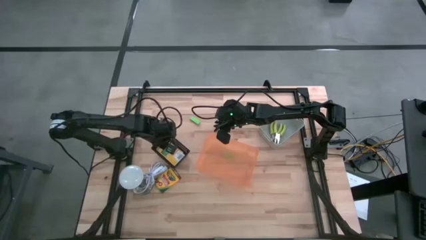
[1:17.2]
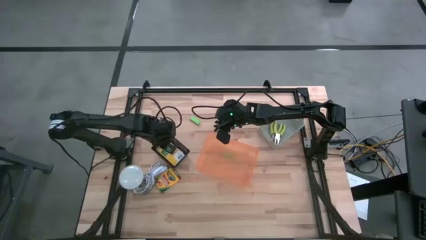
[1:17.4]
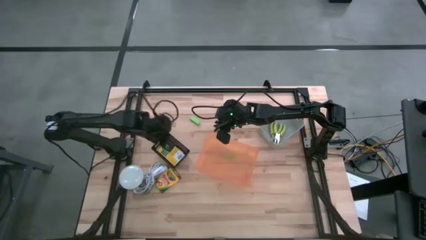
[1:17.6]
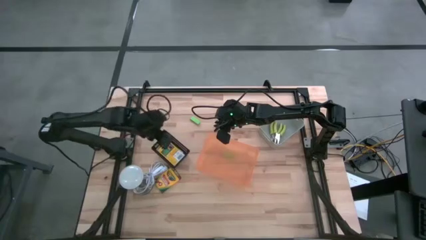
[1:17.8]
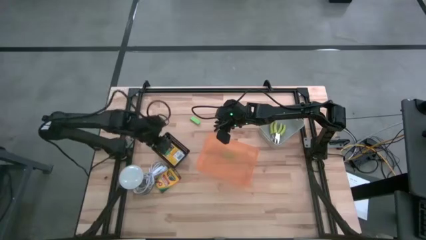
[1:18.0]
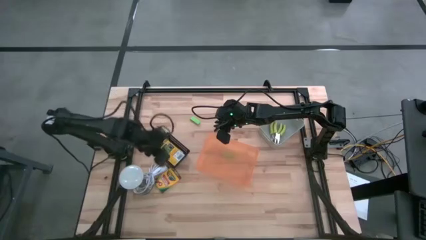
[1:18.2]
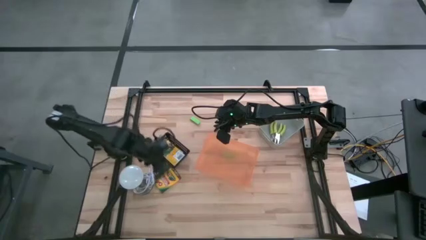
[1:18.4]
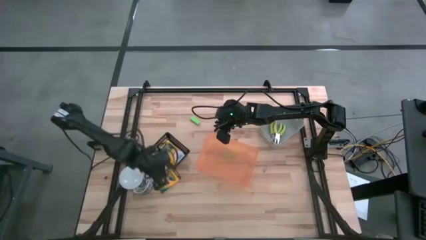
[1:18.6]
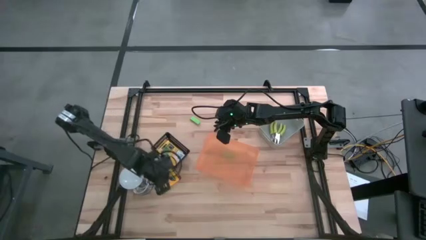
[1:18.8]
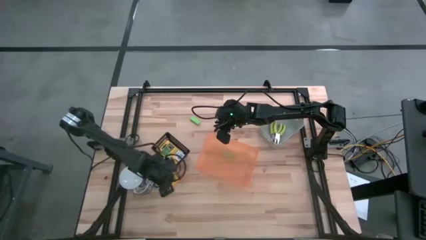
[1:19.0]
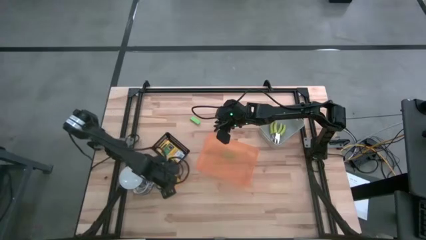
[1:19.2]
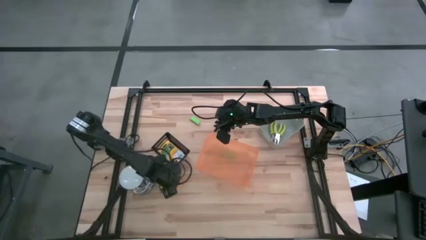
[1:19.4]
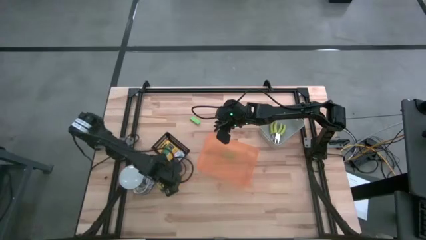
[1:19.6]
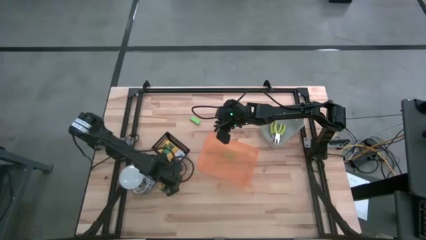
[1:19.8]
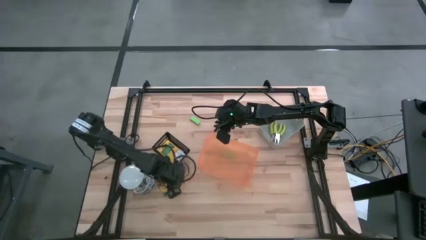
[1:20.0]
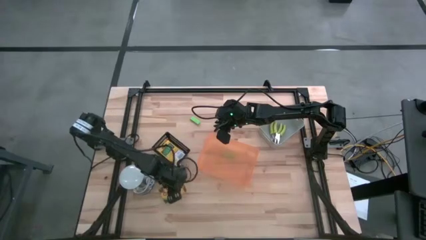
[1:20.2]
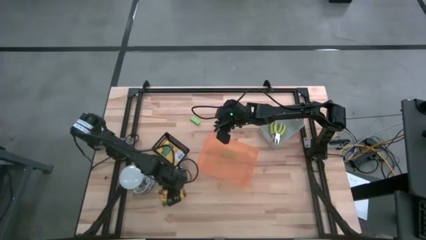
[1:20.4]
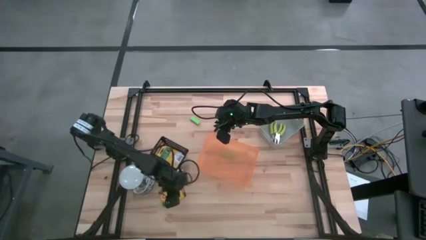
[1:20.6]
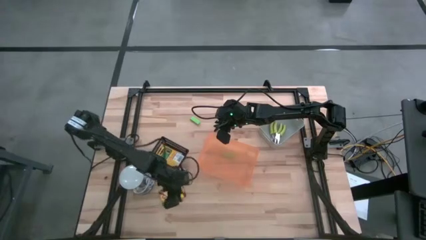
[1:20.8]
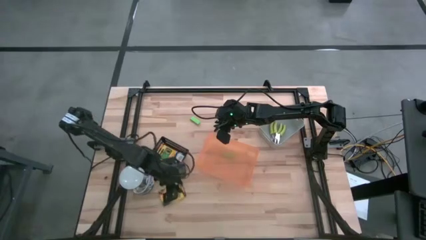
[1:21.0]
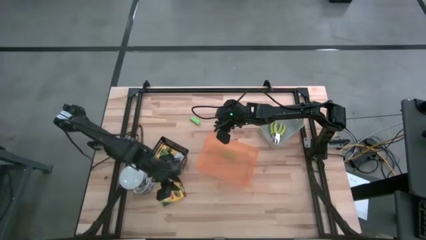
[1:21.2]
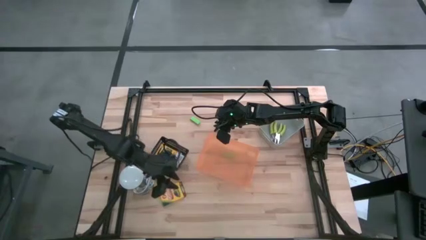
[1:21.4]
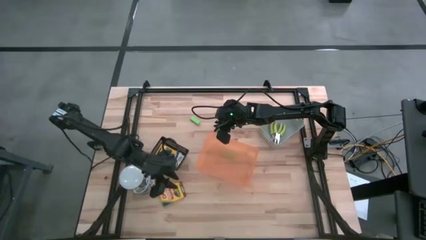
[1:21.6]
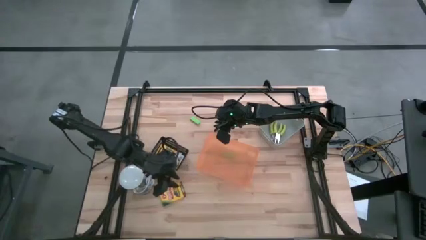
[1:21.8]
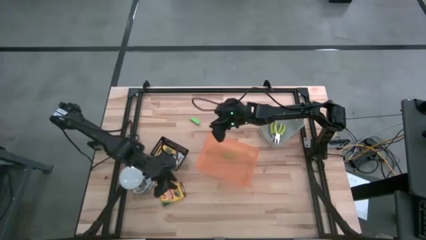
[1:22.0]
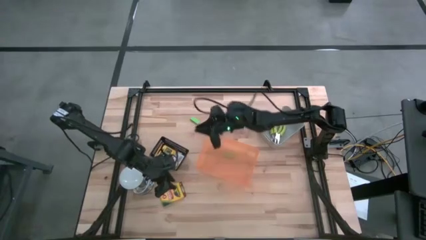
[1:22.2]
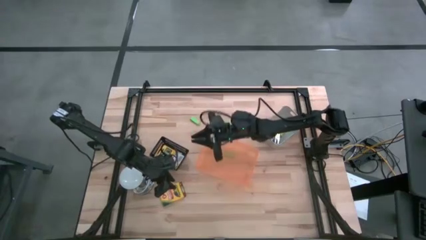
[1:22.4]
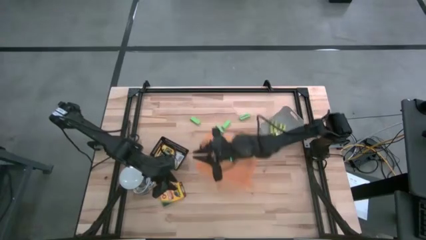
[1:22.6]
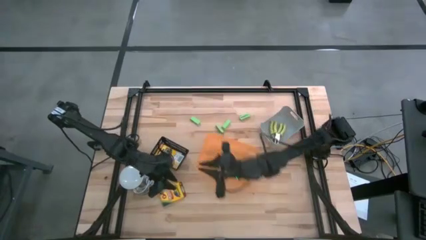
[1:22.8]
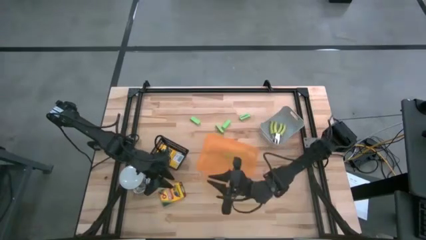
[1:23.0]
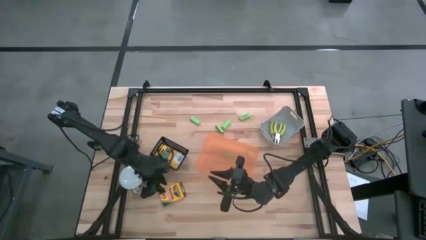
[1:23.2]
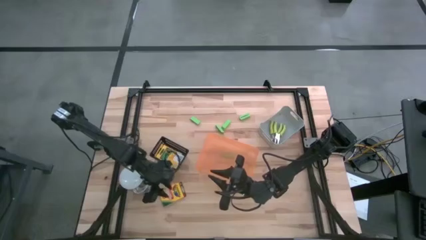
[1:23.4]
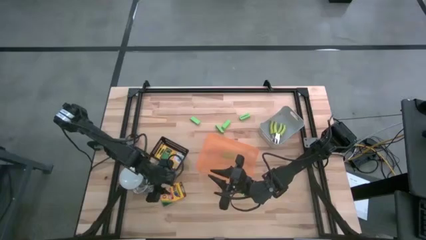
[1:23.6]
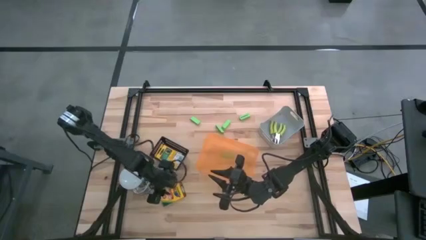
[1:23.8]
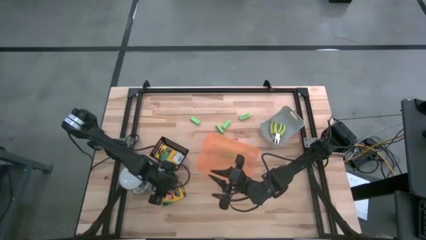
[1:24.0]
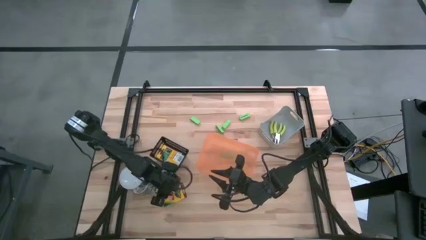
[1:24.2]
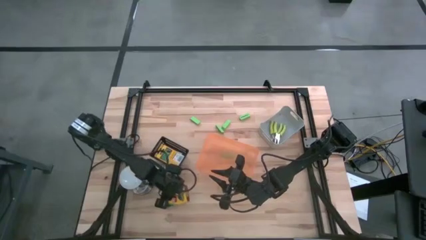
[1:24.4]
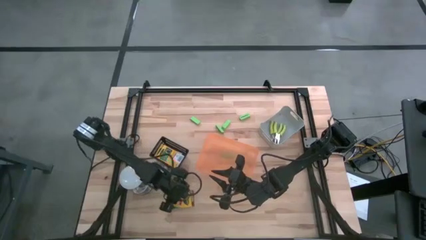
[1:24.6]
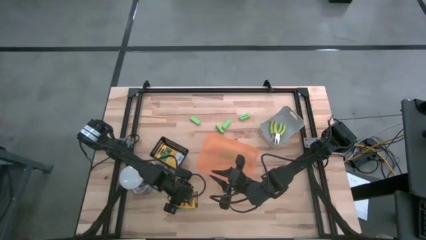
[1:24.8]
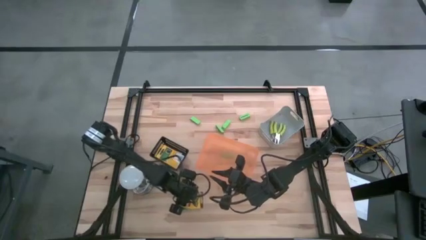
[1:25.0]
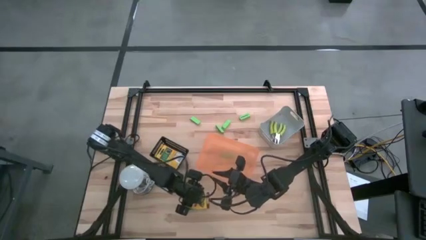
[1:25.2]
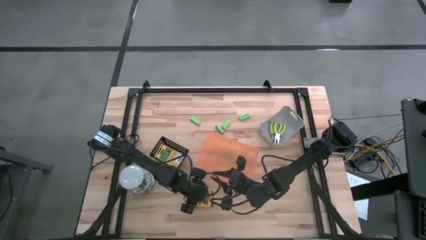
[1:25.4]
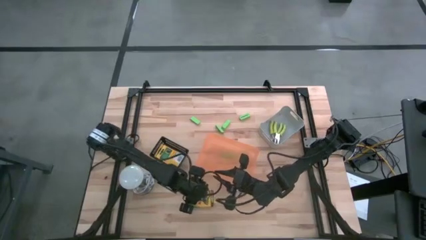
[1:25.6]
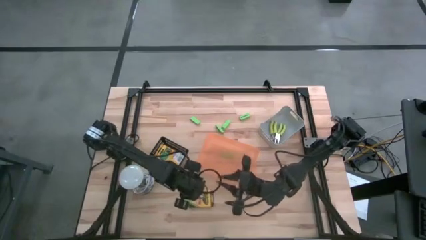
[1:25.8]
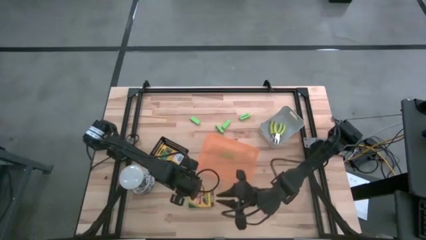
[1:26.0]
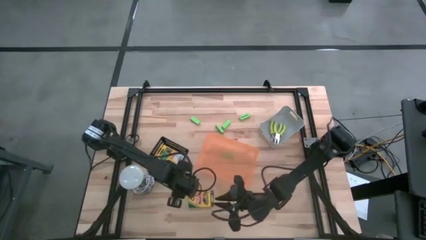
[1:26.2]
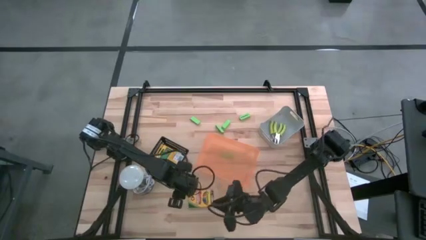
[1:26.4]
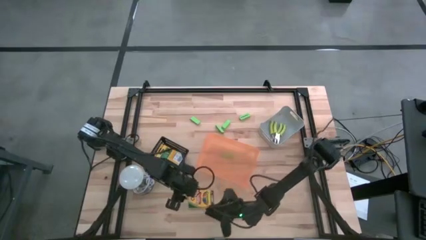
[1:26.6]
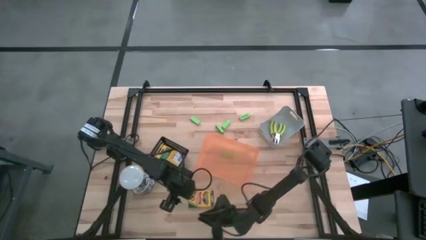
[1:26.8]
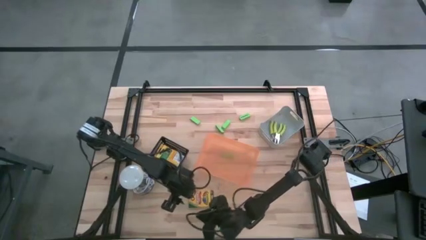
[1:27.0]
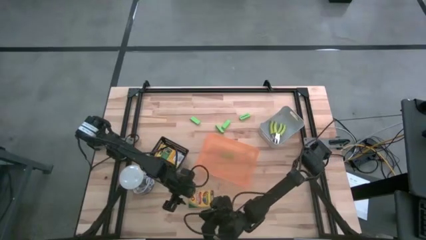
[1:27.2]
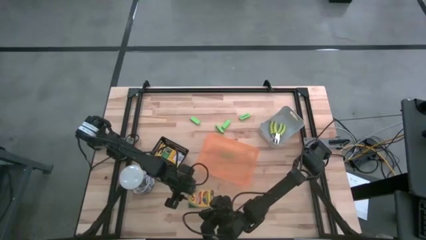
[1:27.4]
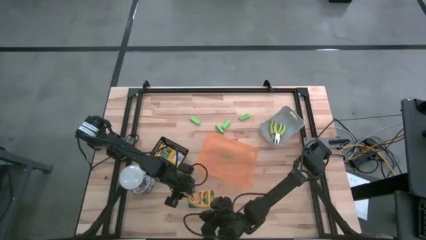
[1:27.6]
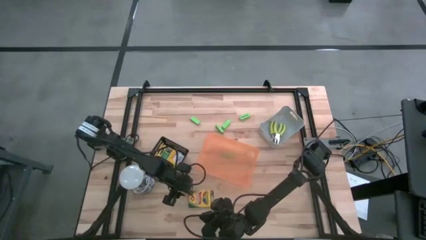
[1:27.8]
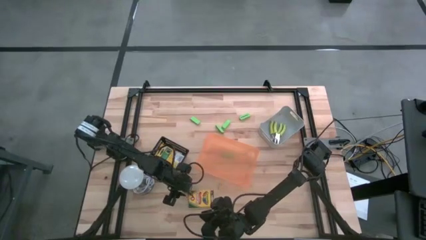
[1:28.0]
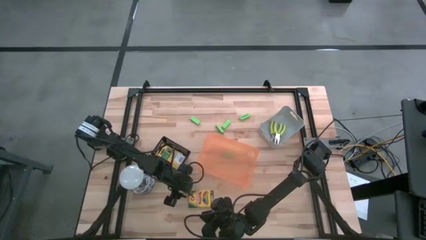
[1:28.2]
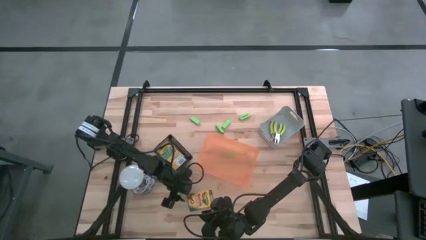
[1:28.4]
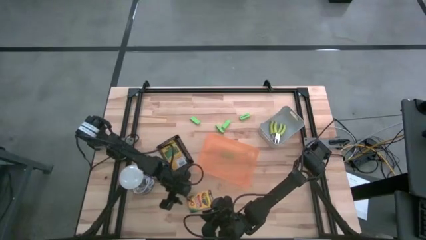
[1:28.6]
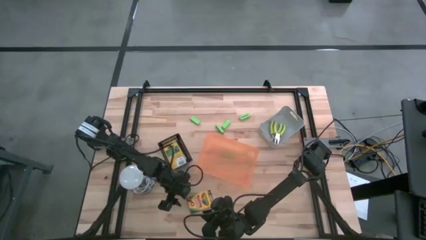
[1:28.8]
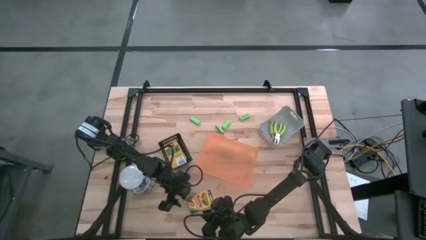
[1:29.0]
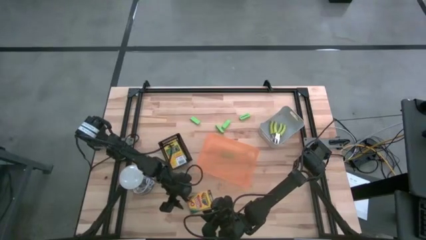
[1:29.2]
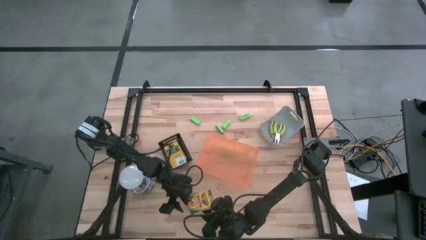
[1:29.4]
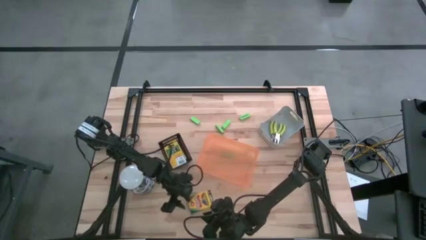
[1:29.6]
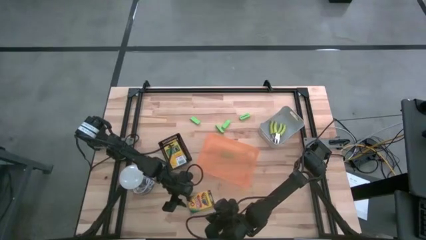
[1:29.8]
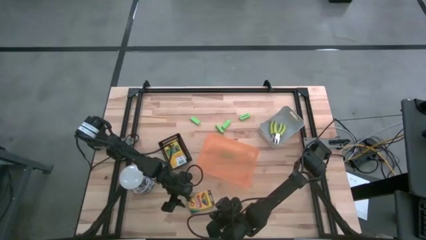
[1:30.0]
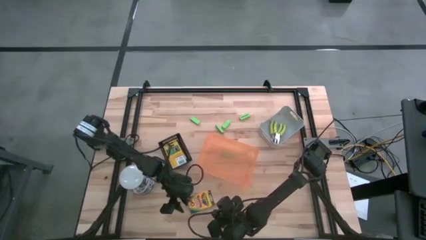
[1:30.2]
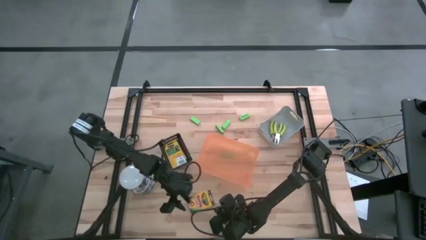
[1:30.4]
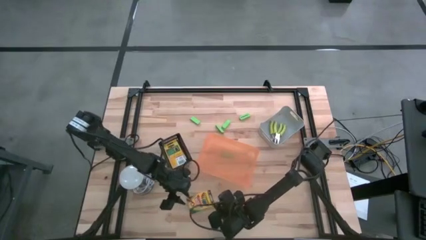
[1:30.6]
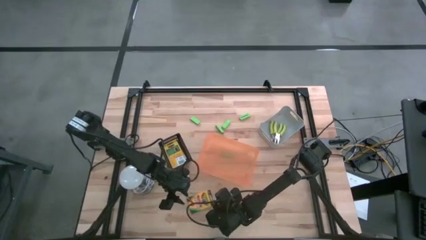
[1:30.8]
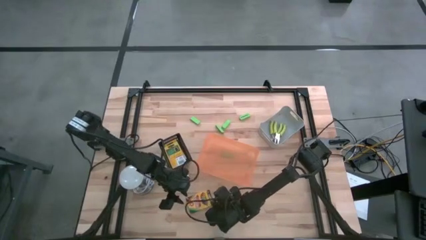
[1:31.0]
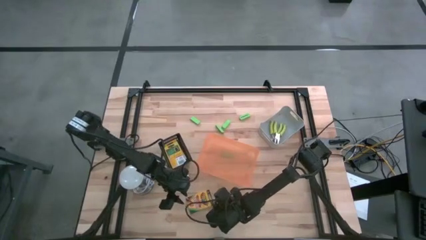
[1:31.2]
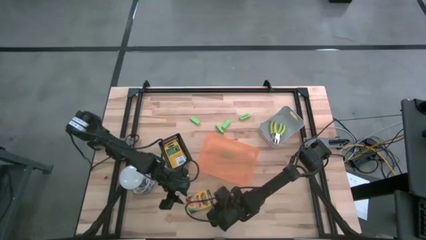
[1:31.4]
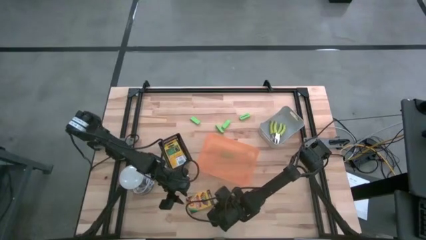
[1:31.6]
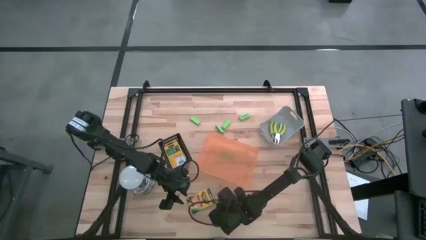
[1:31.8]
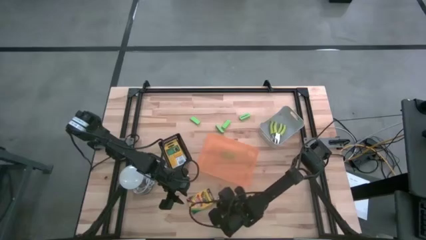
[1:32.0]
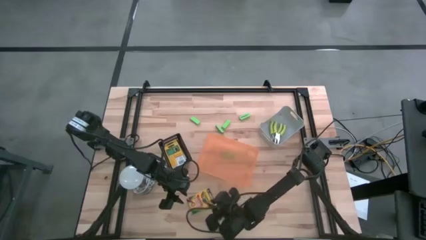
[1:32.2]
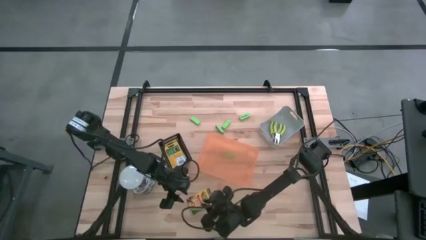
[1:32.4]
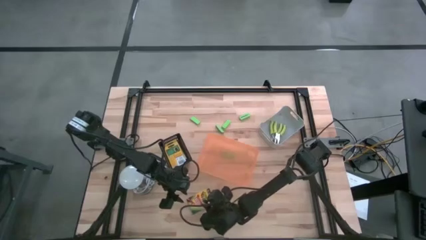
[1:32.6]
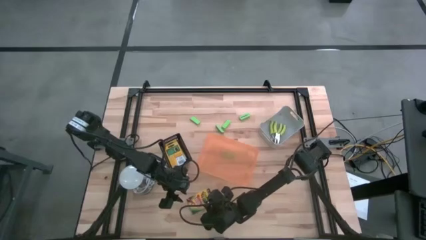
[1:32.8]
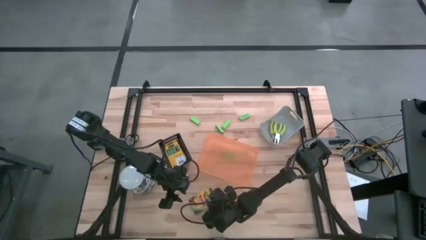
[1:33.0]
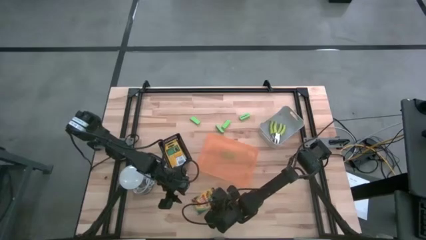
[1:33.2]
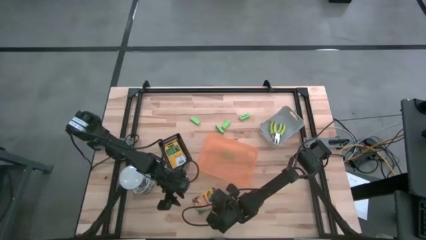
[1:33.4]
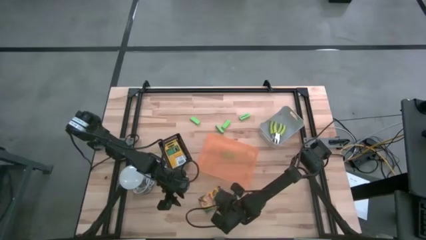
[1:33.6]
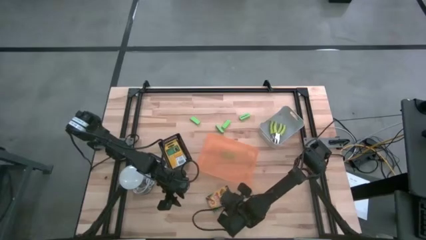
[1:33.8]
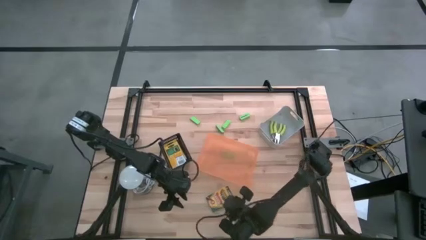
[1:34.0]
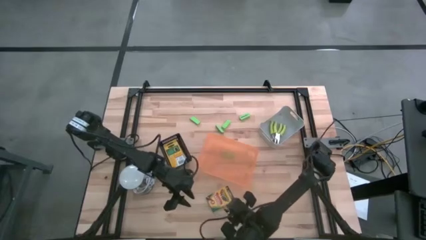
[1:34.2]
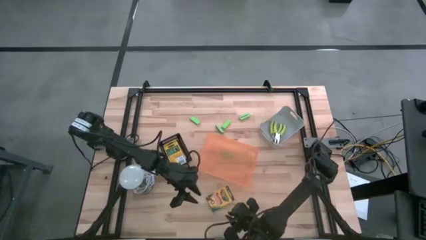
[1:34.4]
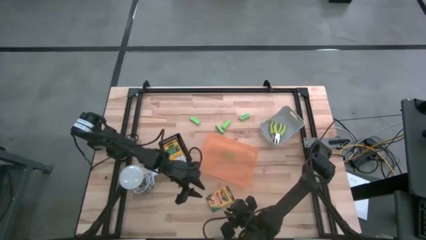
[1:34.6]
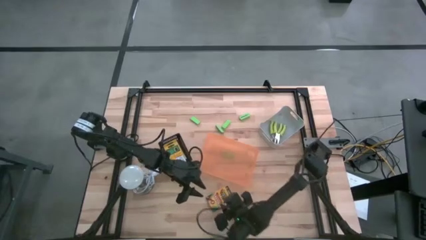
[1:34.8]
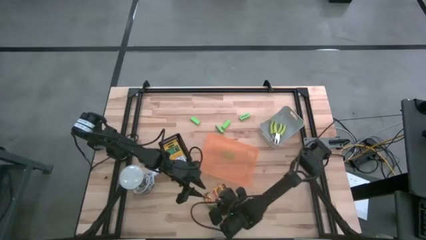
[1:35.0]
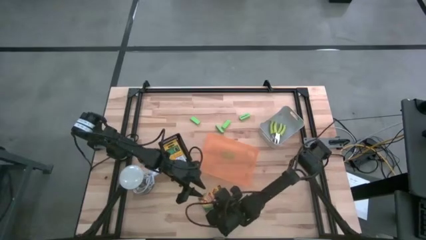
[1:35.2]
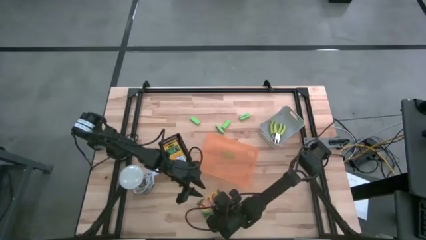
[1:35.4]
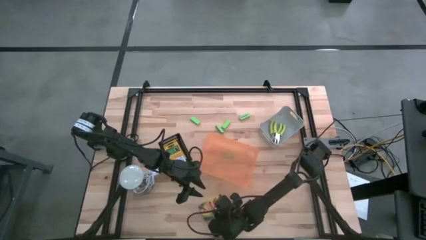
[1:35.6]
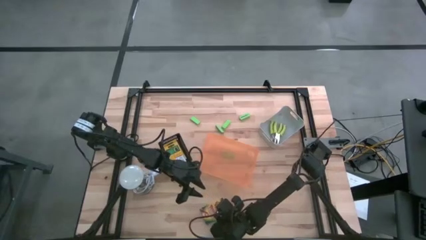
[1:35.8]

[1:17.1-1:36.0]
Task: Pick & Place School Supplies
Move the yellow crayon box to the middle bottom of the table
